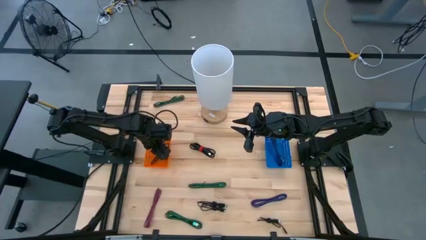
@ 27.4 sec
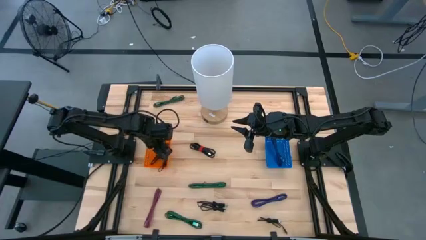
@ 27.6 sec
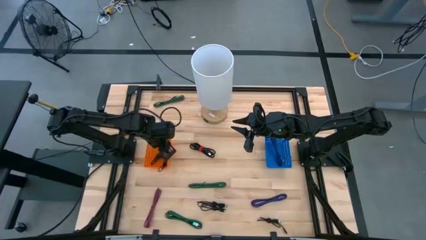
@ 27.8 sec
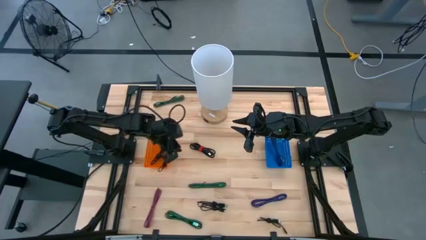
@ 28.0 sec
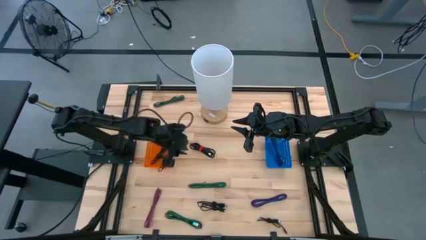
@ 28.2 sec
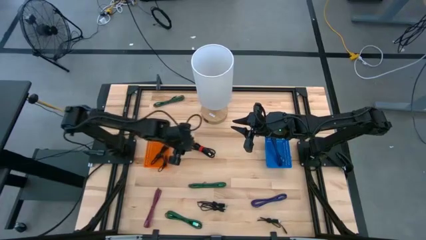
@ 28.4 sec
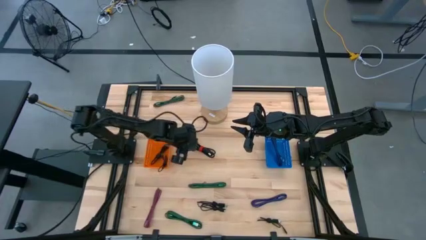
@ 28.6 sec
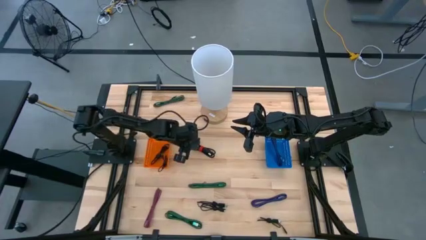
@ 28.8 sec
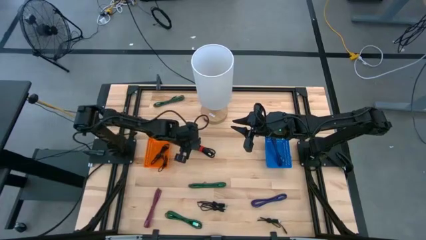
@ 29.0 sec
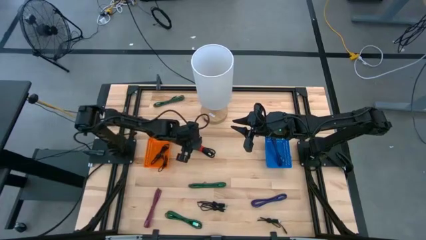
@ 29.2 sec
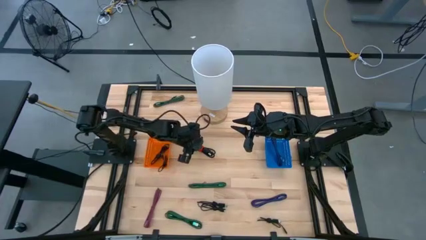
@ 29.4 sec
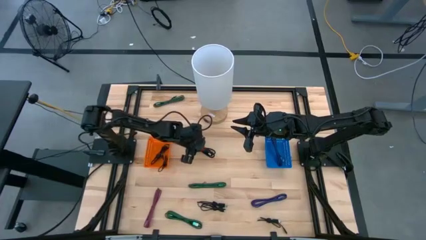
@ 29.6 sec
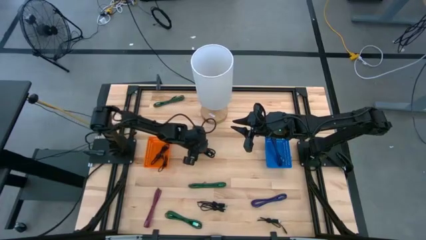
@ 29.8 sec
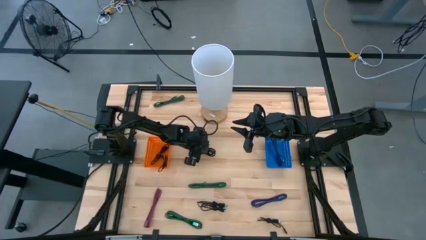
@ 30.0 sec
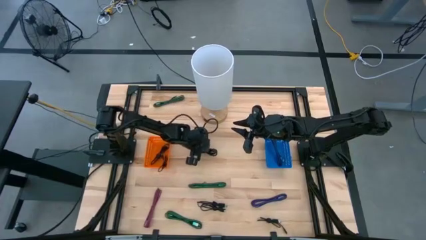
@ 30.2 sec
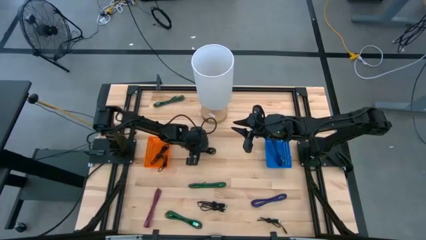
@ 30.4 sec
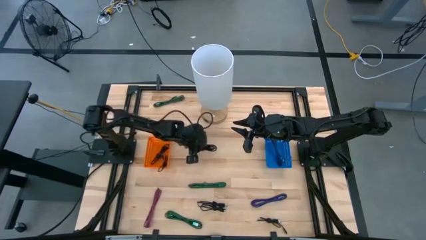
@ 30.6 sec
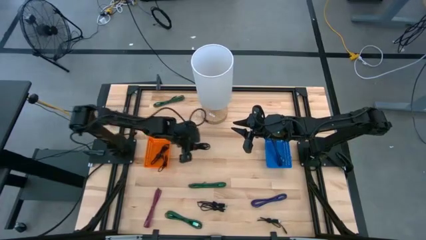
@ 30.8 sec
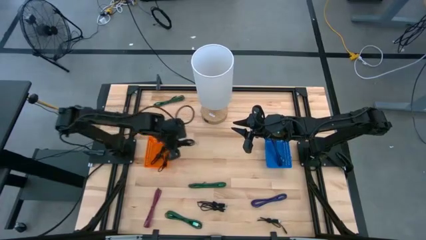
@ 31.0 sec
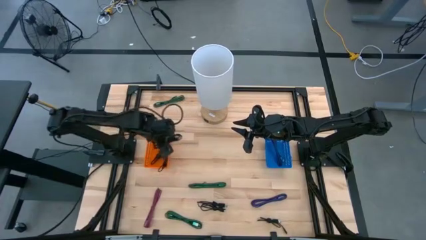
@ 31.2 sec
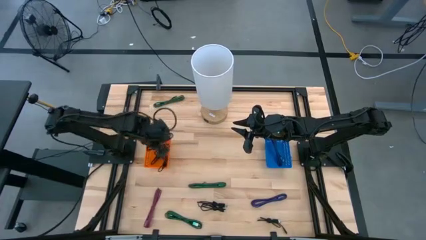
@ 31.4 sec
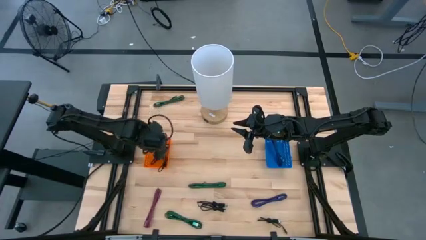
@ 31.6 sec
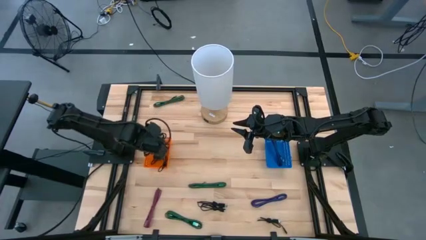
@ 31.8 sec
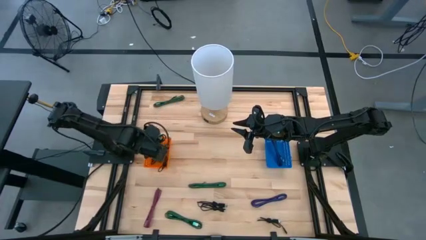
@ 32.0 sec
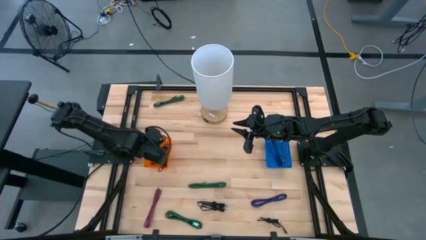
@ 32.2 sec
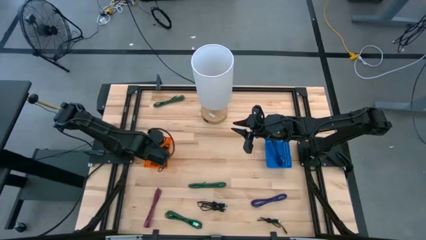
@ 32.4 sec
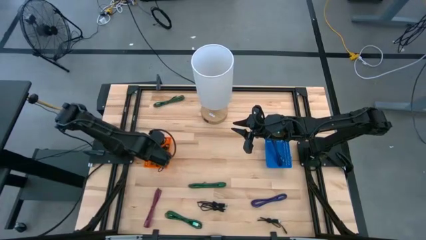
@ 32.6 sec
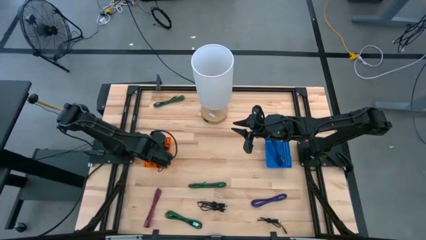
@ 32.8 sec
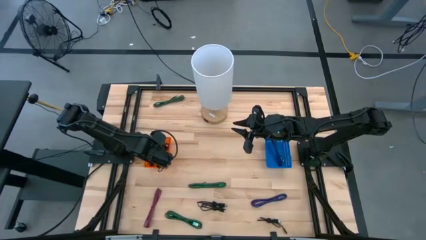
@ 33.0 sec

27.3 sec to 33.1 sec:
Task: Pick & Place USB Port
Put the black charger cable into the orange bin

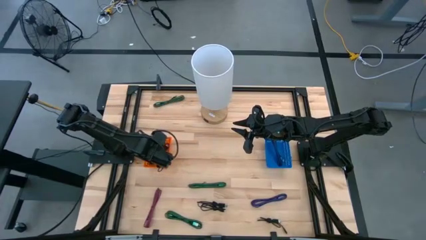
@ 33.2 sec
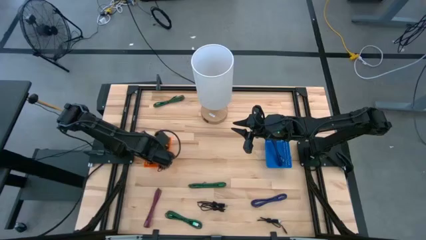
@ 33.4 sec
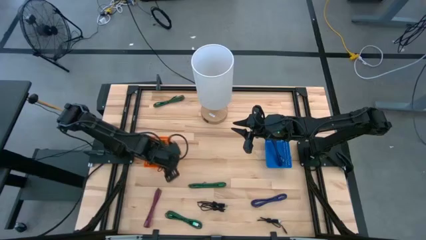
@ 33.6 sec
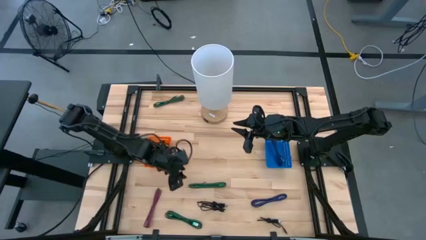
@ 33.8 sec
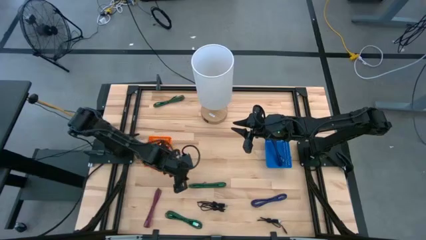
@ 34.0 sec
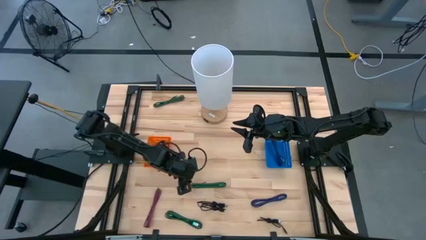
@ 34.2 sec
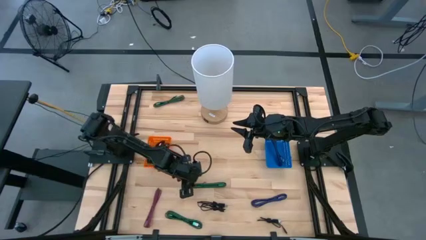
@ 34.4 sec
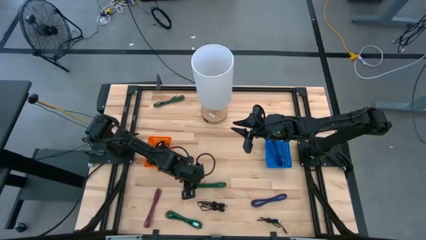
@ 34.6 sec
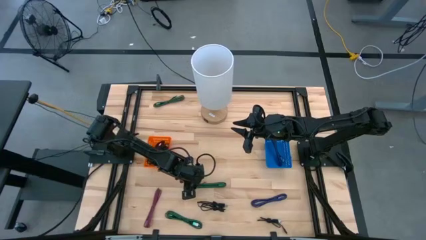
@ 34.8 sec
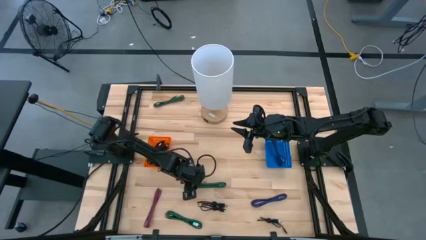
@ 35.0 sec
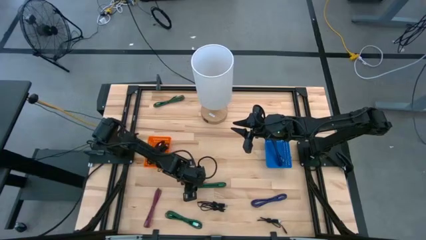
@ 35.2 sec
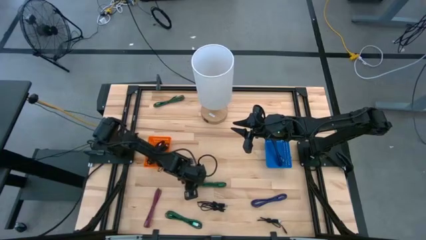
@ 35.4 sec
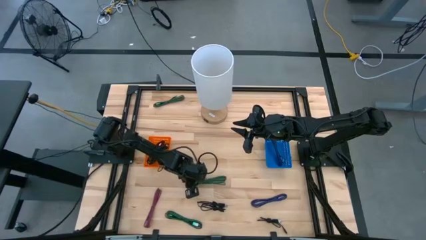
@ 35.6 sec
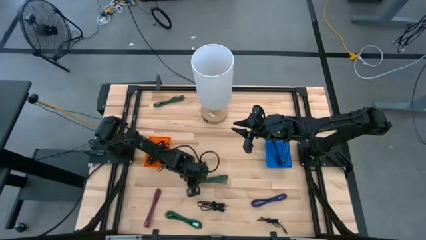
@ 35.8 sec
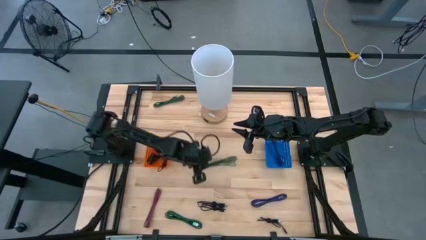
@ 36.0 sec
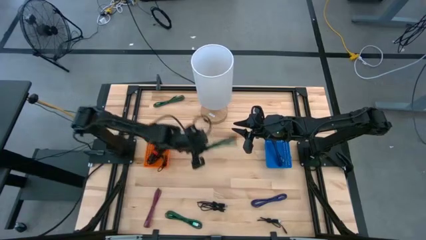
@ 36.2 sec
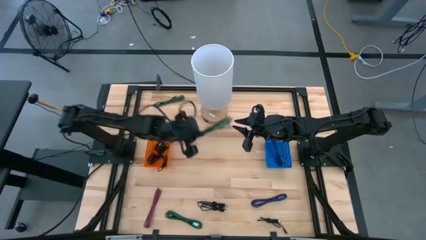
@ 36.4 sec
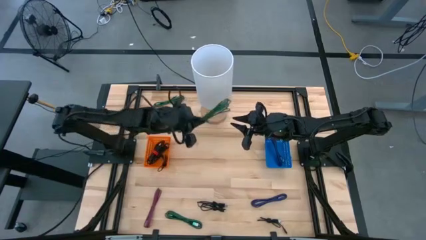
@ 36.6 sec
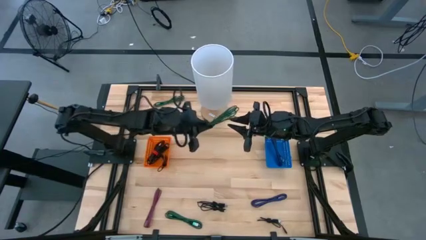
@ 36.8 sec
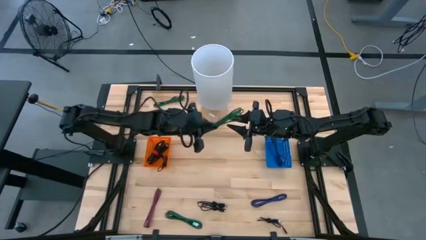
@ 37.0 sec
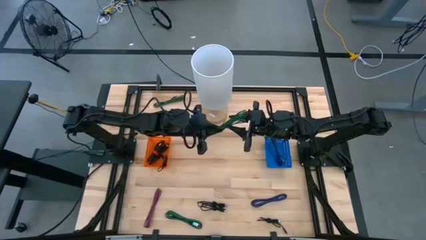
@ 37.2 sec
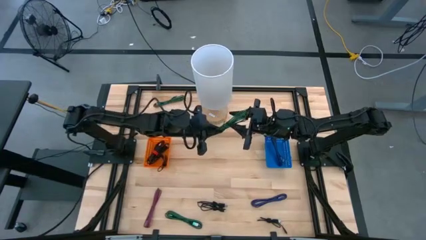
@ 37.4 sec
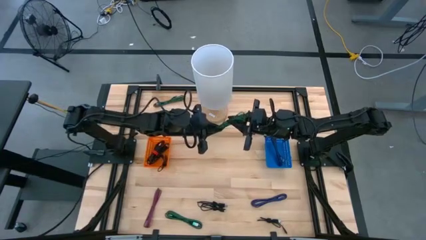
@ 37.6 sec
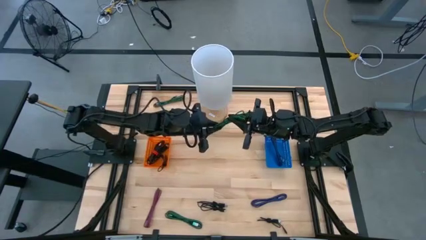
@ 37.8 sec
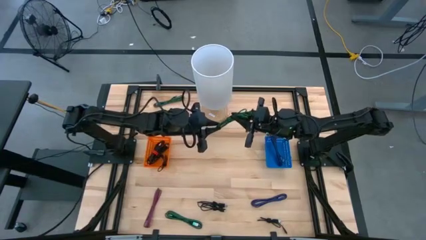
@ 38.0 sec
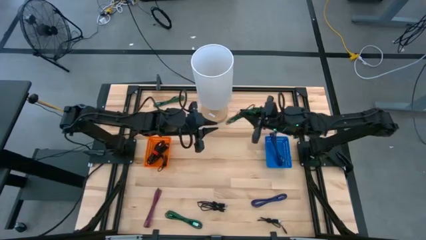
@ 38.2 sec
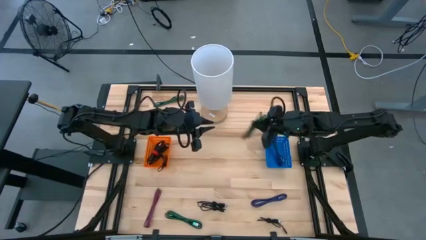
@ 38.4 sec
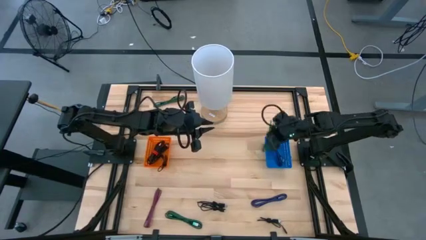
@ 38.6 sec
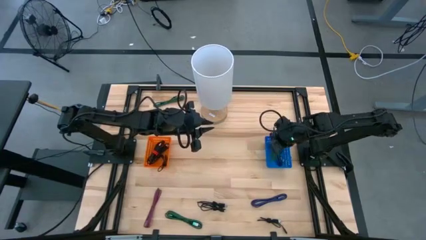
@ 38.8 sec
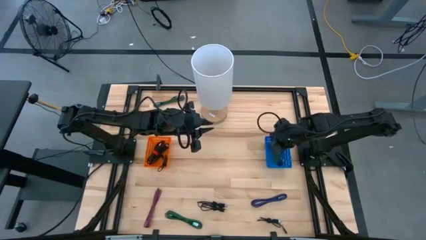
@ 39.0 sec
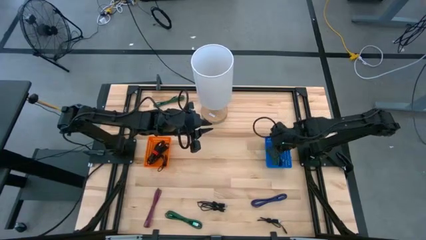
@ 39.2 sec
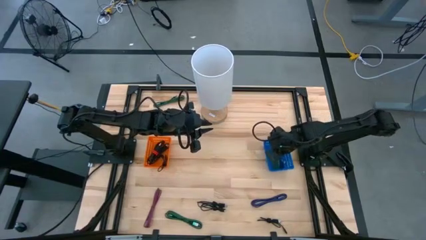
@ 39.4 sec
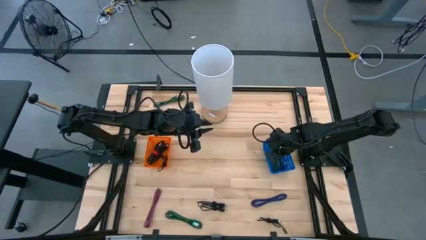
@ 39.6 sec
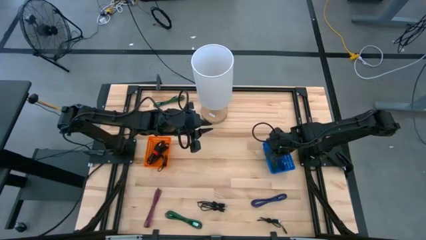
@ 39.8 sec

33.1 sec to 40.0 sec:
Put the green charger cable into the blue bin

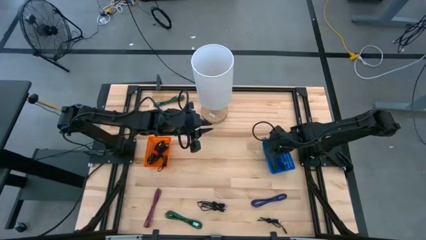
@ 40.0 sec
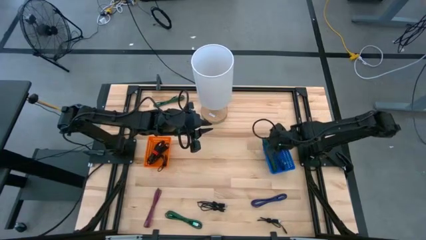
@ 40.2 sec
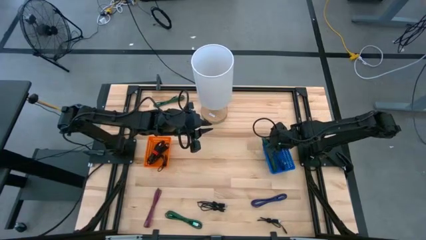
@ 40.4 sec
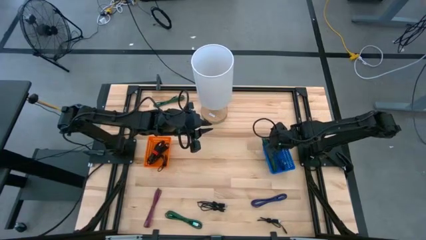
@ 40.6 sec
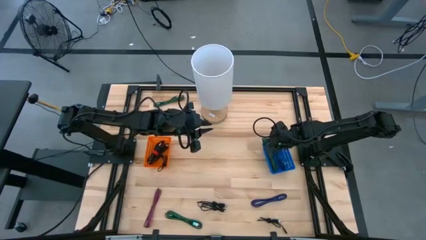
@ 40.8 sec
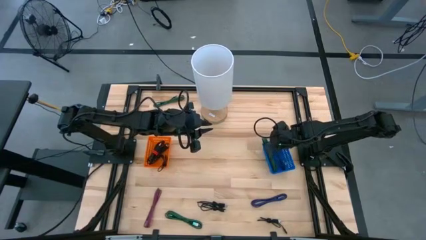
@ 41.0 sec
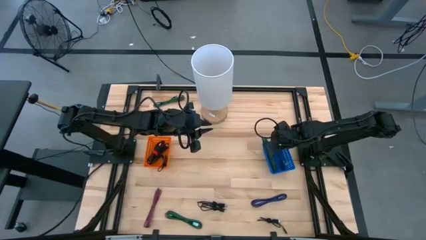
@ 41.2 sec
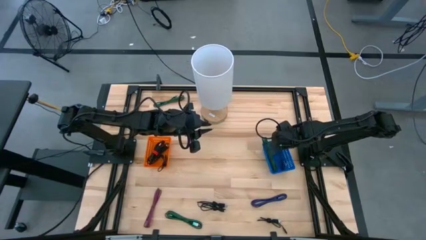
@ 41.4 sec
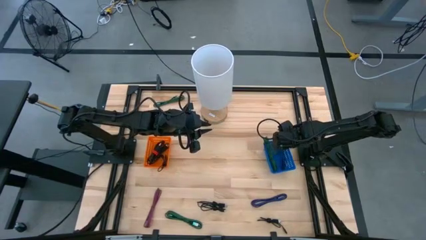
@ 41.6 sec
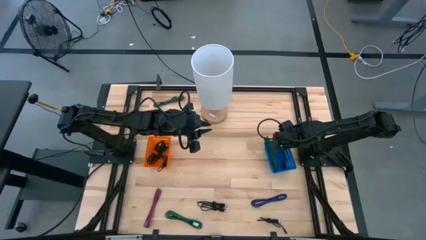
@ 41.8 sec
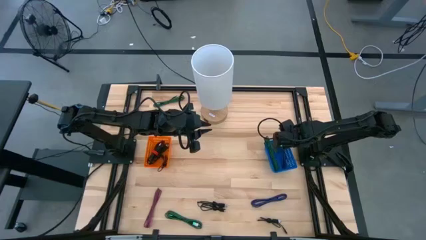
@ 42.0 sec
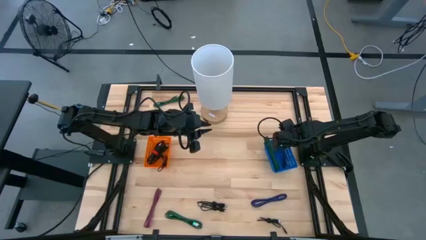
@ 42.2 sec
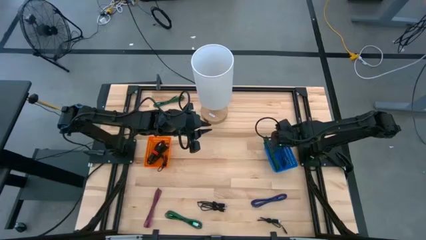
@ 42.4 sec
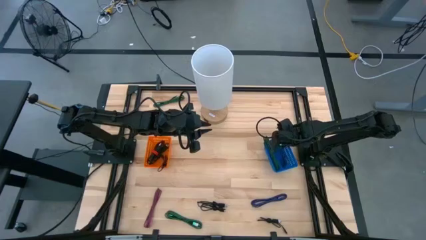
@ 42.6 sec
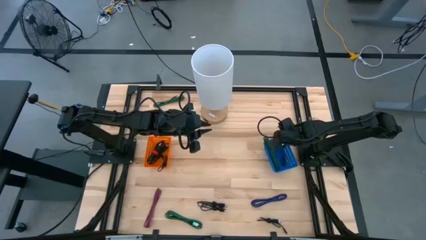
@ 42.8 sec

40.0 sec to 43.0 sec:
Adjust the purple charger cable in the blue bin

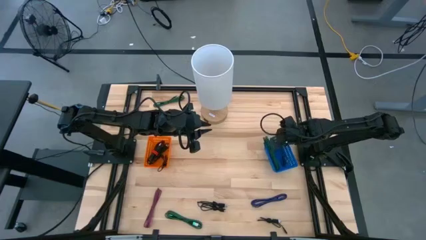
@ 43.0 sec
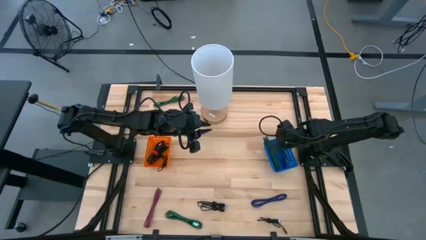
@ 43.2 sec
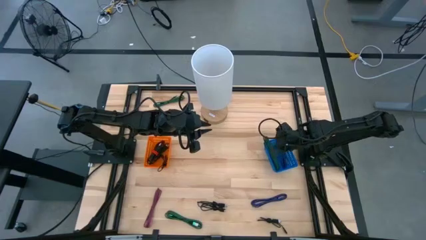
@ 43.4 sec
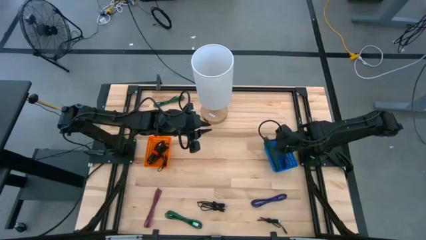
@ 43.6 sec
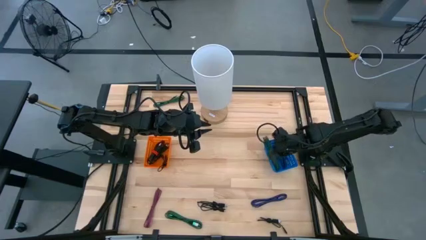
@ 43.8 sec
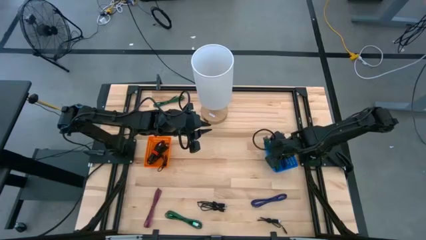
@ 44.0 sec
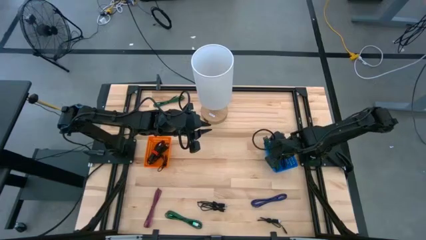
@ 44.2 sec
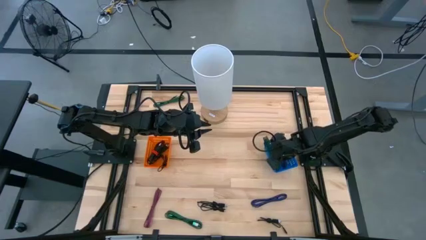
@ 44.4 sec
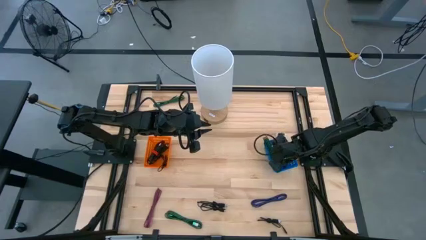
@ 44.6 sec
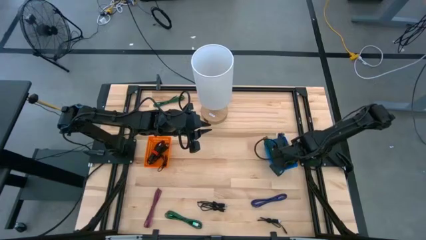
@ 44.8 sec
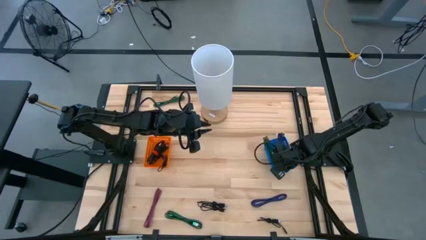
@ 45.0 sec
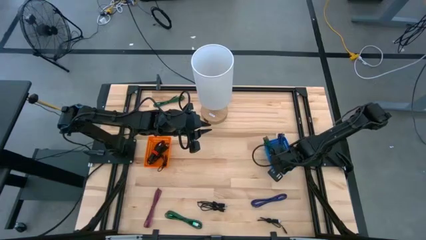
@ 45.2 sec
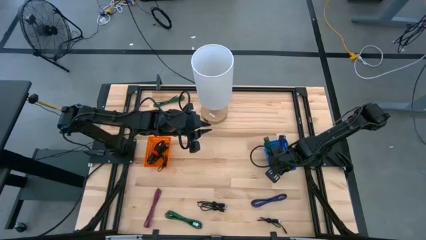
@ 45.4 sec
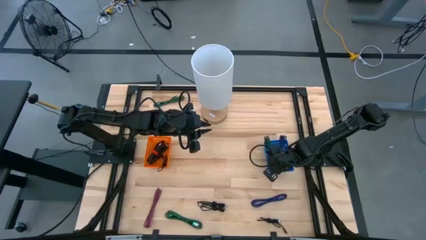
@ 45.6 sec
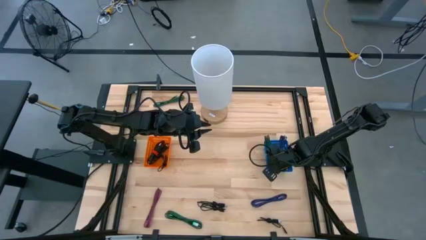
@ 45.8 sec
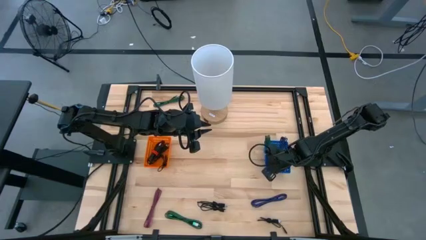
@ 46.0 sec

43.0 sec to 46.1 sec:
Adjust the blue bin
